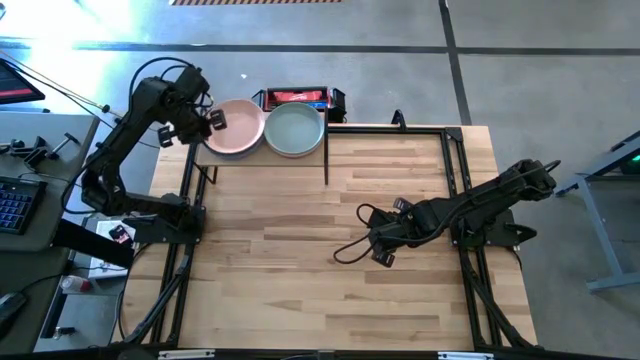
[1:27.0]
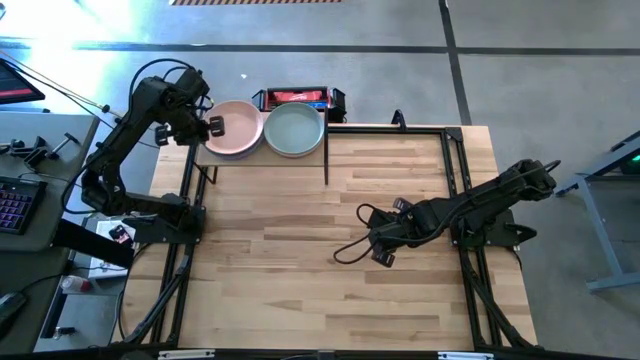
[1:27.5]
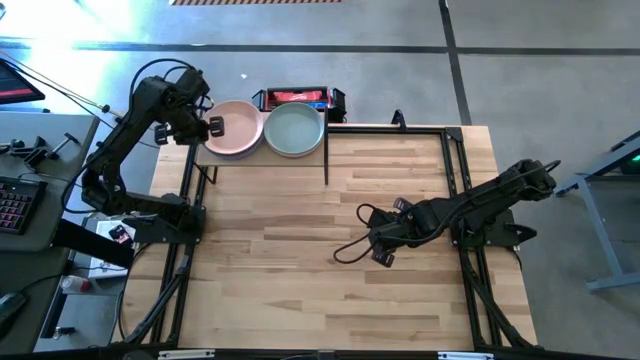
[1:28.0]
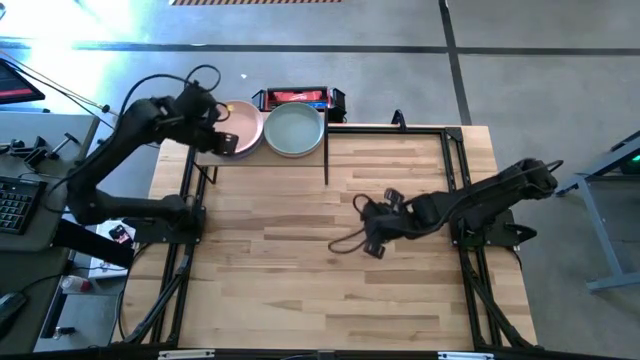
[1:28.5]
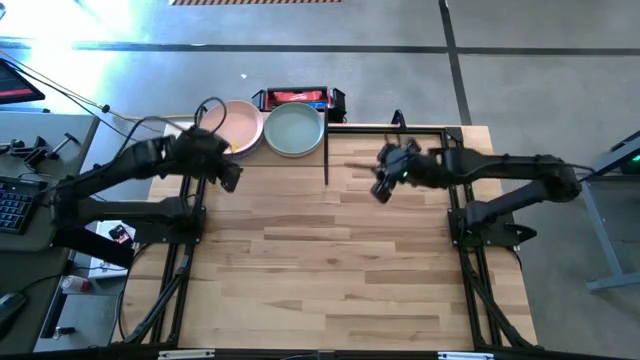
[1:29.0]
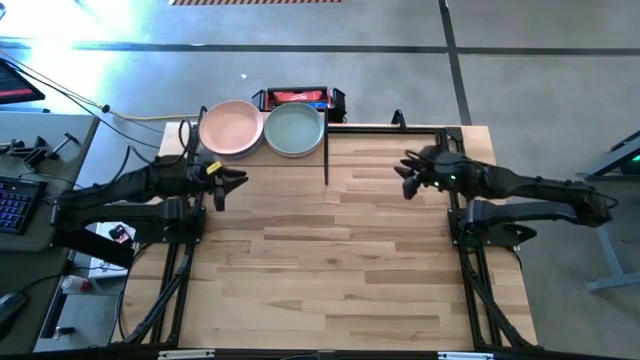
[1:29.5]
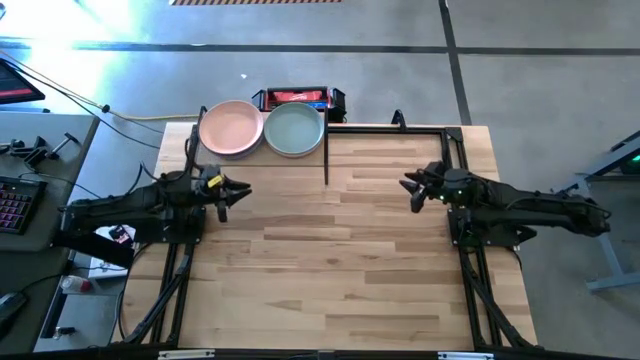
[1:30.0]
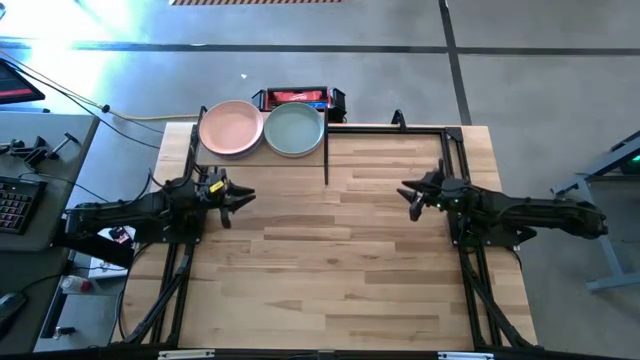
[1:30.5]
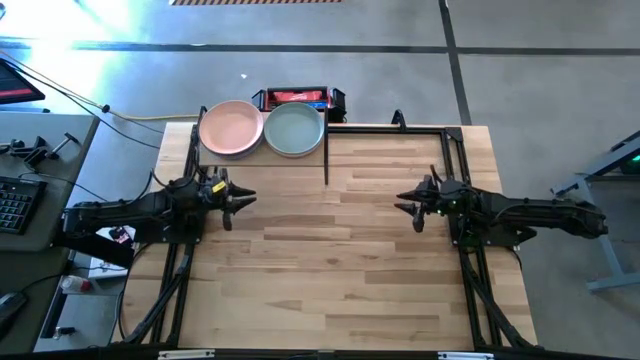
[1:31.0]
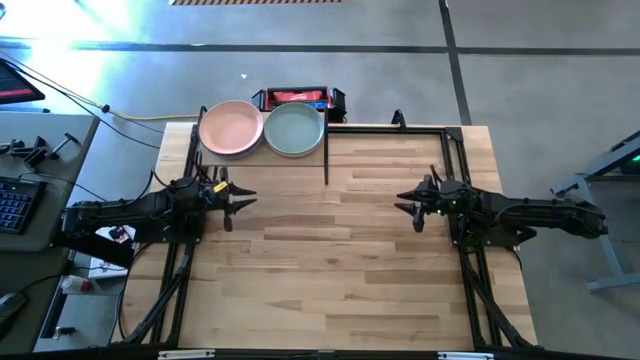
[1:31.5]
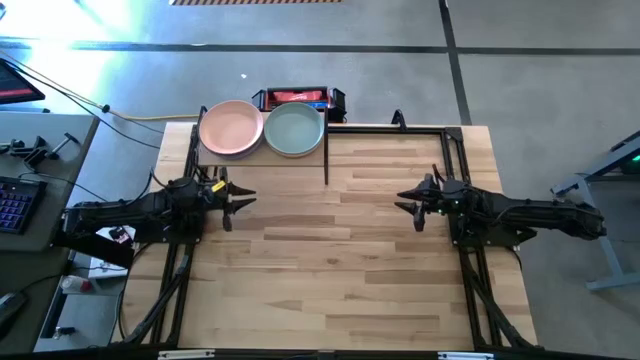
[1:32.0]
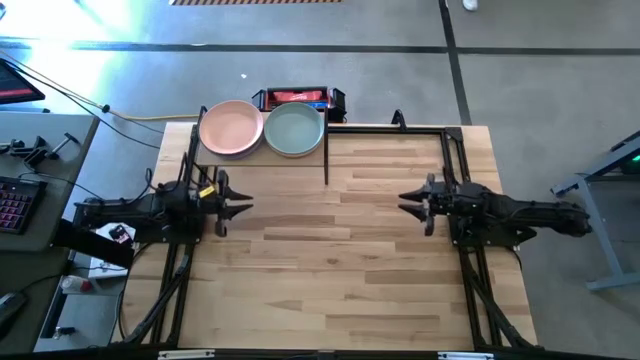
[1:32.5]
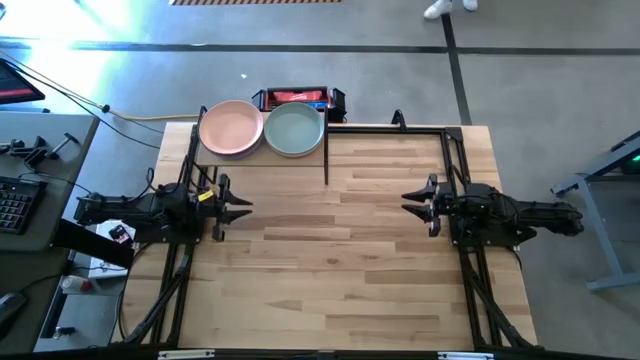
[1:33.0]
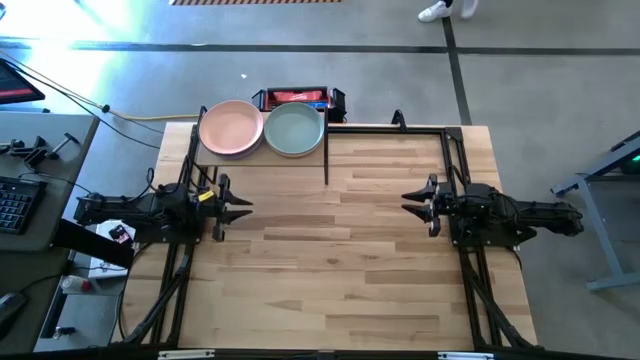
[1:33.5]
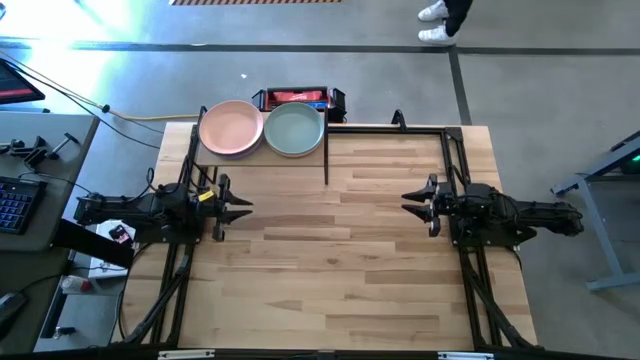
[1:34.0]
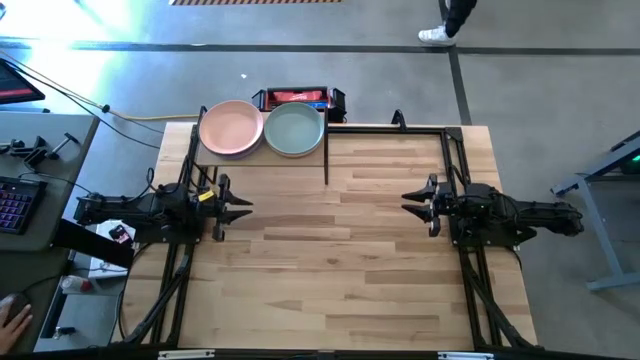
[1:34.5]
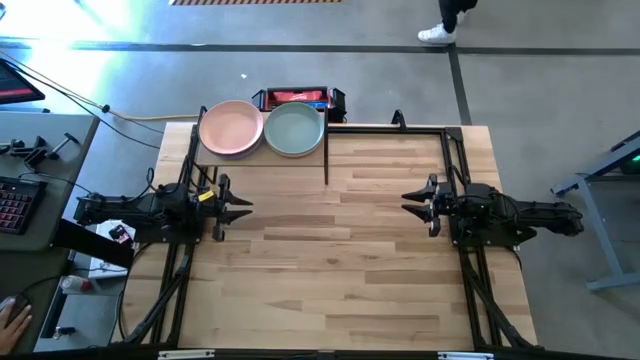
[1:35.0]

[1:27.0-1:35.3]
Task: Place and stack plates onto a shelf
Return to Home Position

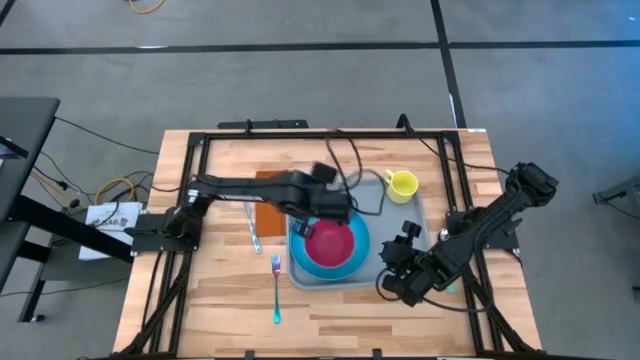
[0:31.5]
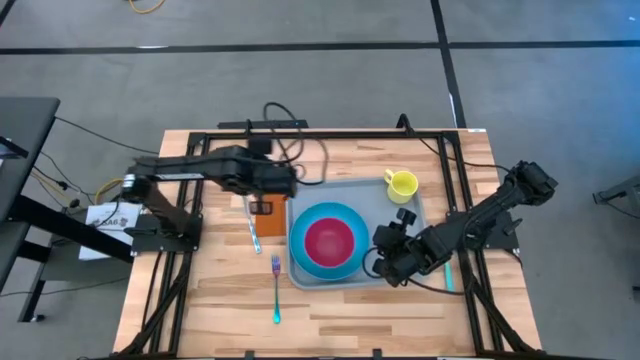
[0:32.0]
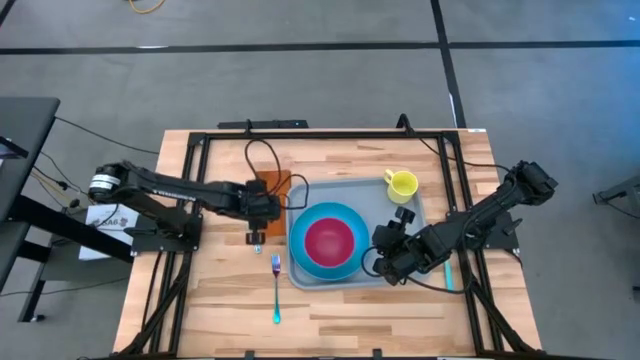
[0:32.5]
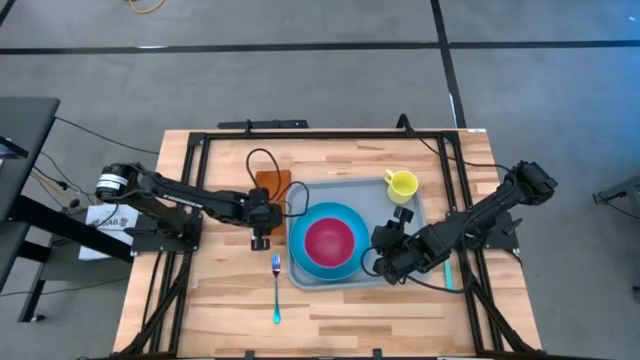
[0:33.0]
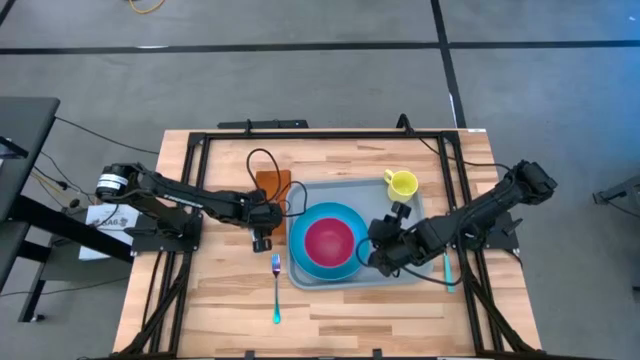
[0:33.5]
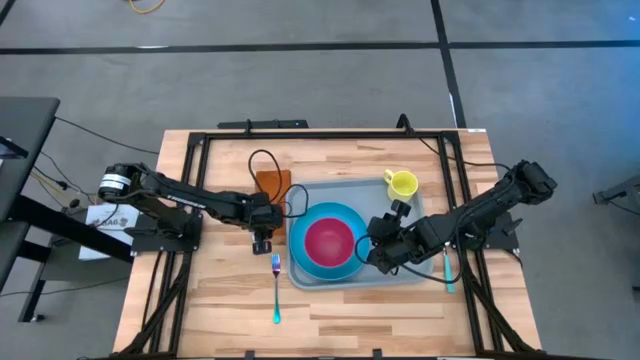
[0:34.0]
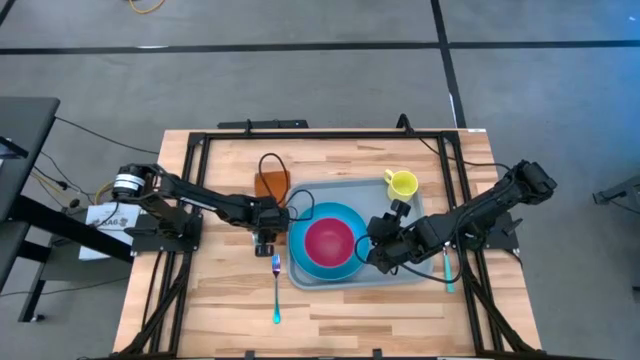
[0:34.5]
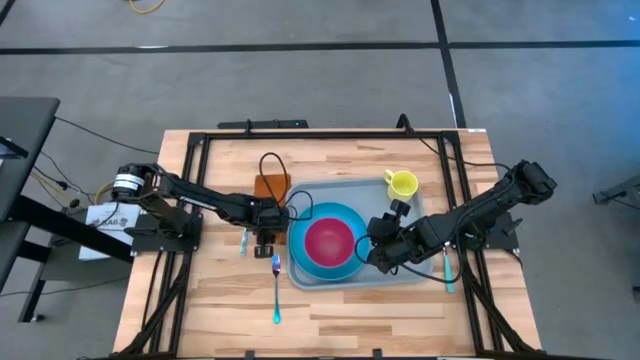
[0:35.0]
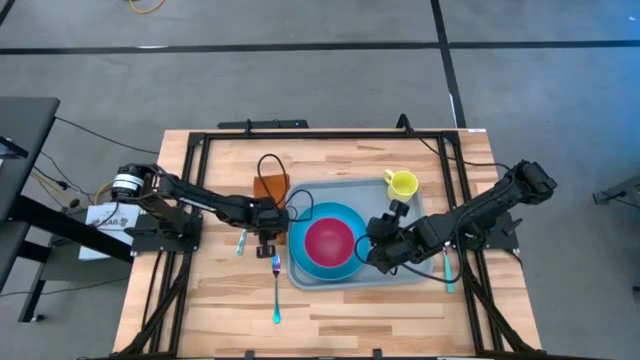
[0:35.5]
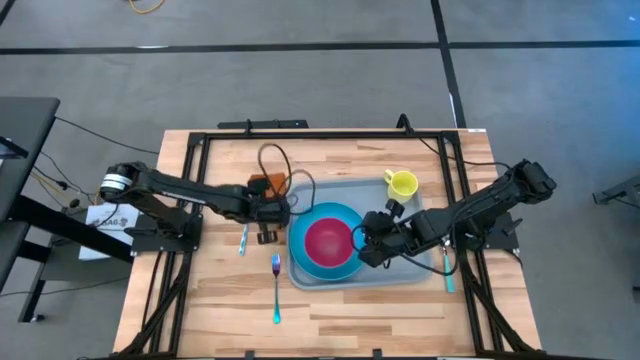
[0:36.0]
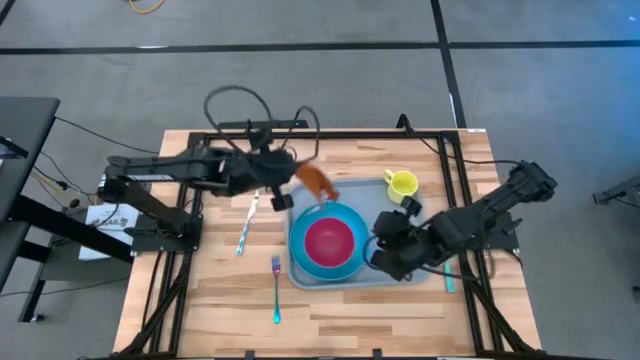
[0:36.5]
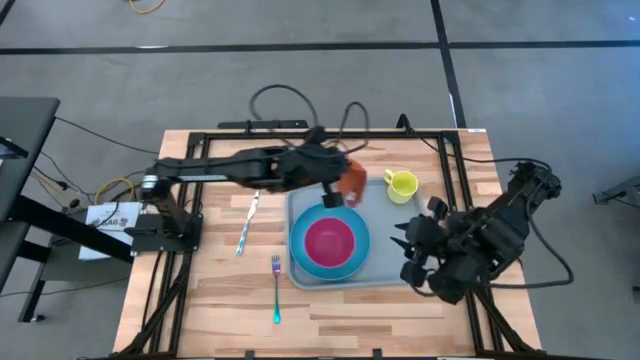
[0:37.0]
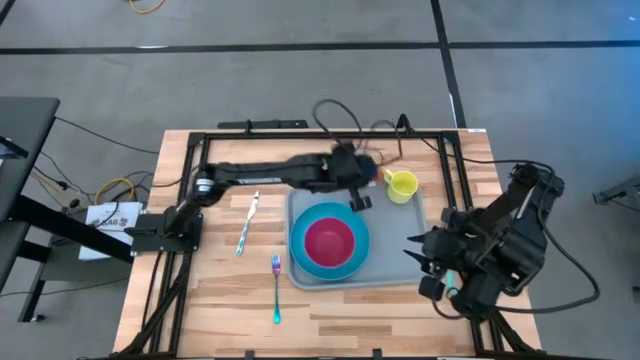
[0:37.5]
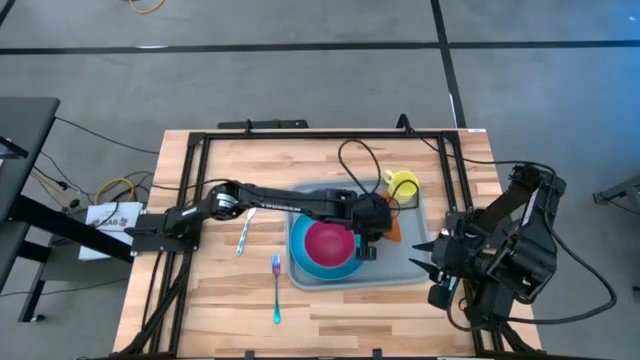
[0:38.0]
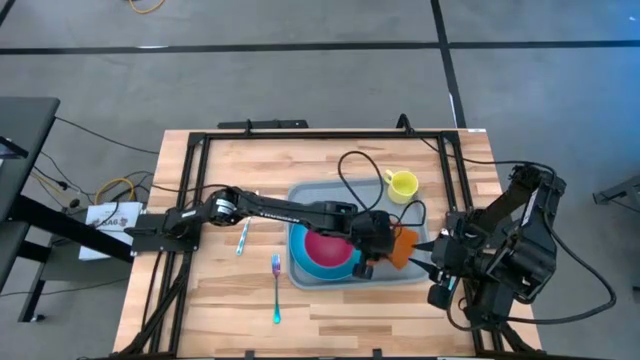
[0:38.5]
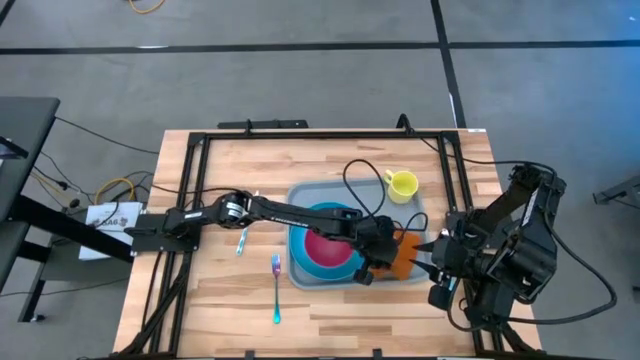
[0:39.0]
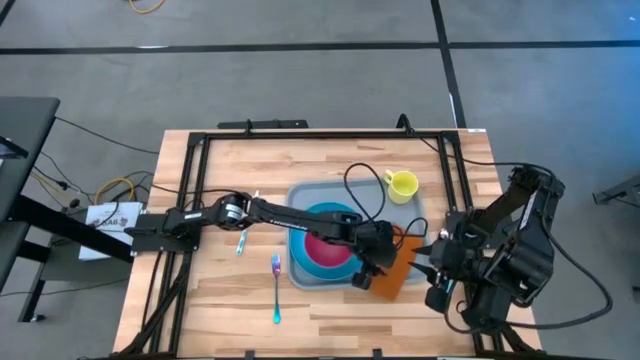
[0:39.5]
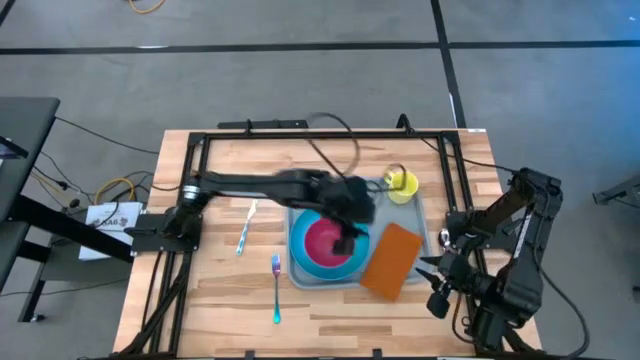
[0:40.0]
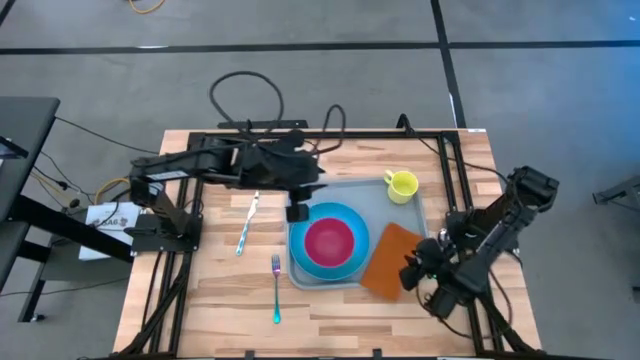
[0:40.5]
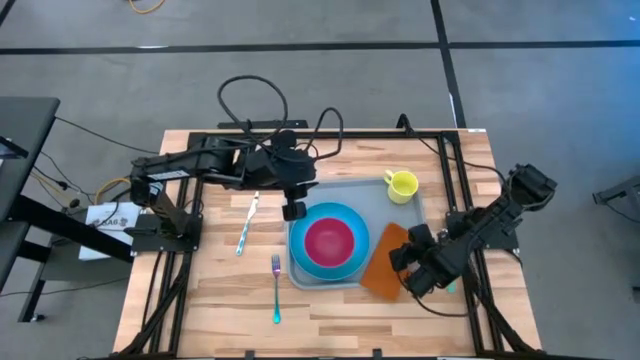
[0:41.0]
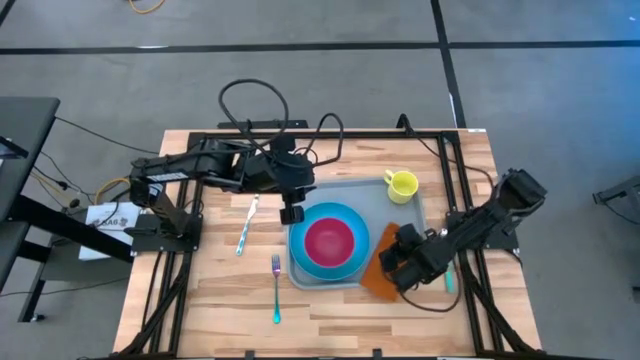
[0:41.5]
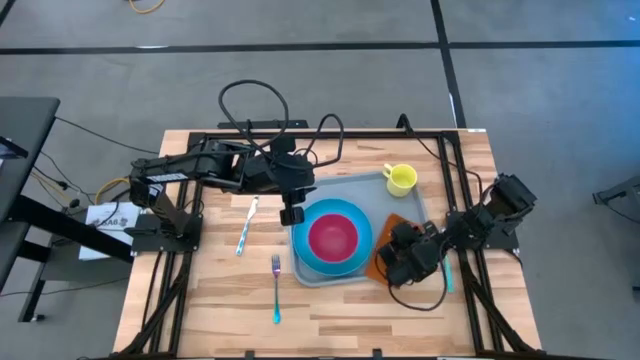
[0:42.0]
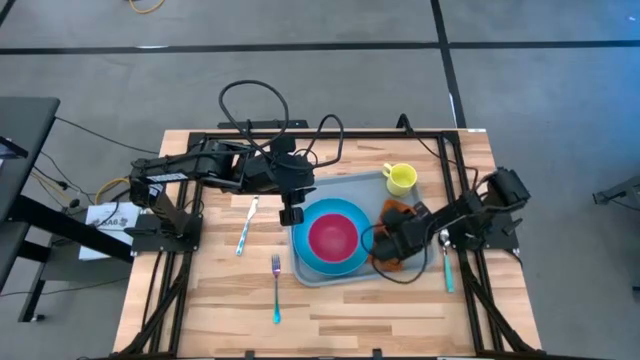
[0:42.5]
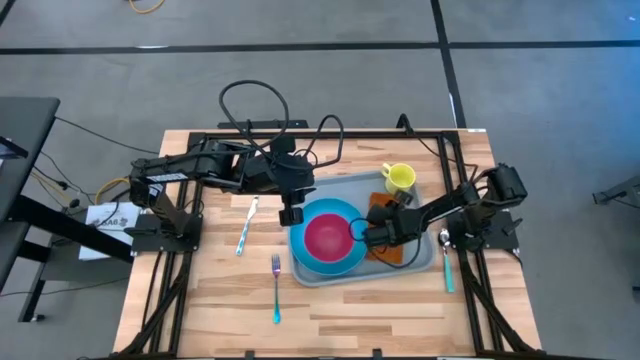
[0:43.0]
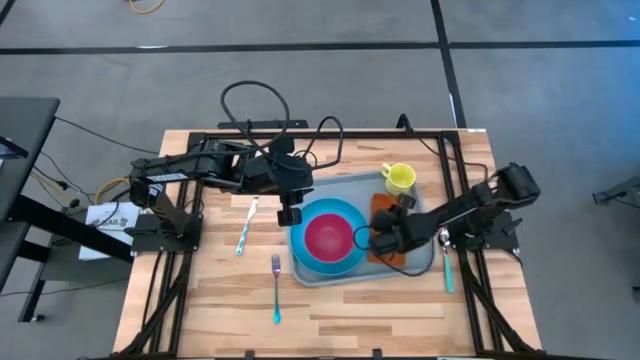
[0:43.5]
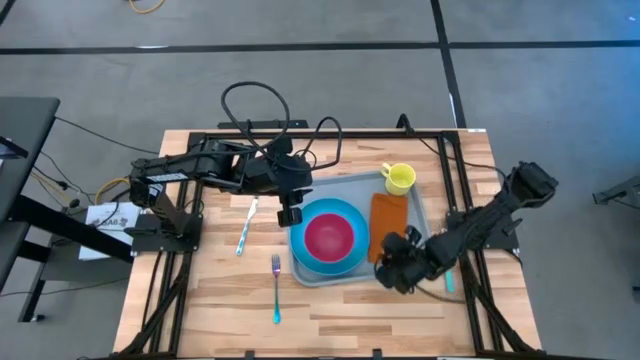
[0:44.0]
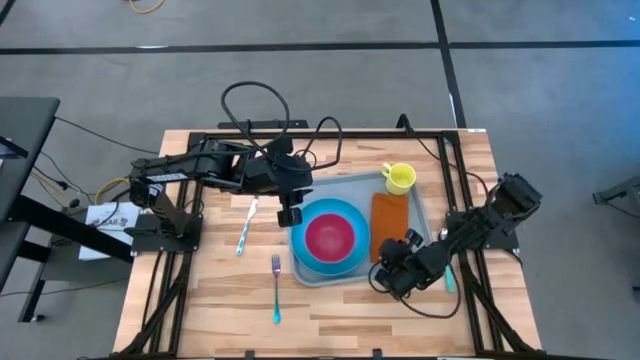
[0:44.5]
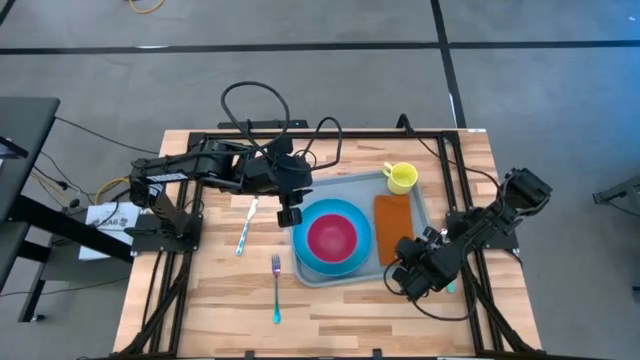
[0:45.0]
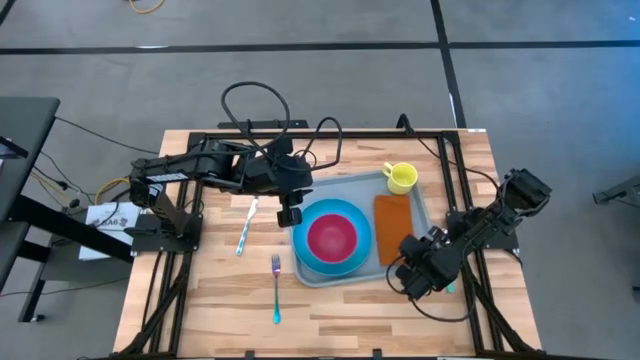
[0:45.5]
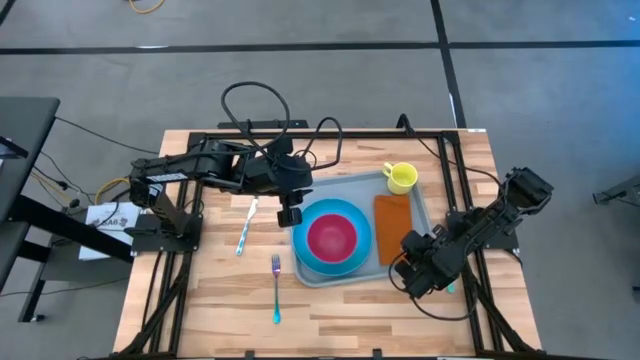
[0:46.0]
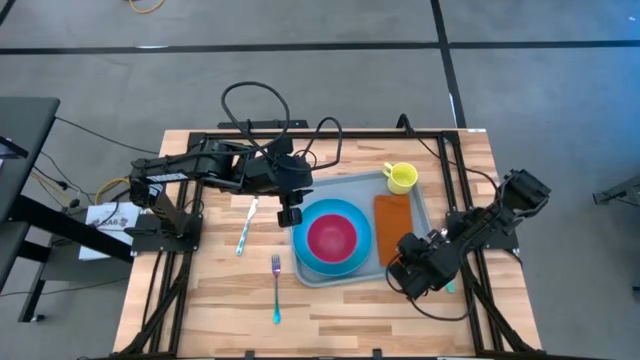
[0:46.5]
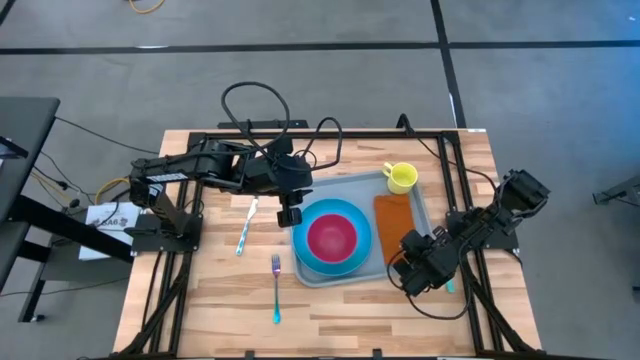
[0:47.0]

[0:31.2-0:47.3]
Task: Set up tray
Put the brown napkin on the serving tray to the right of the blue plate
